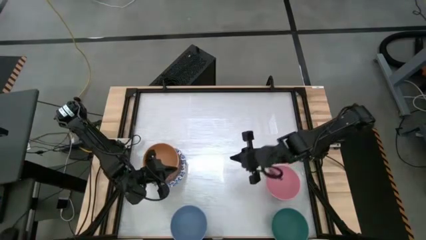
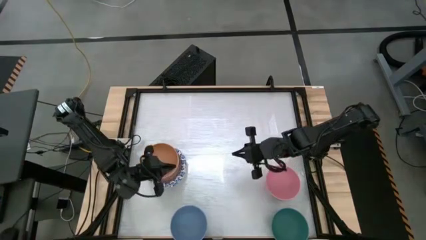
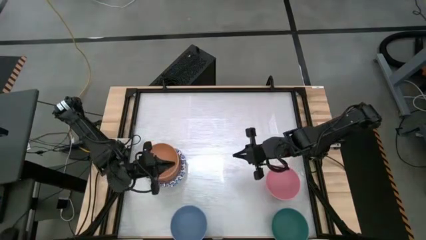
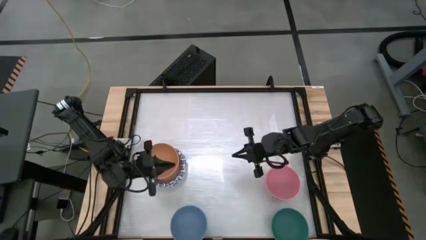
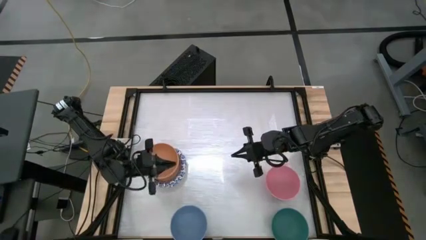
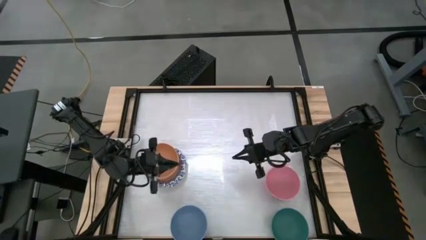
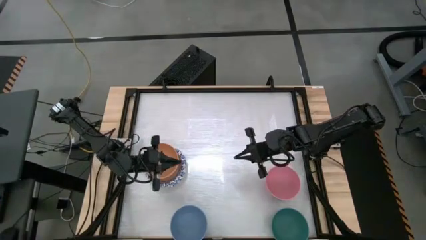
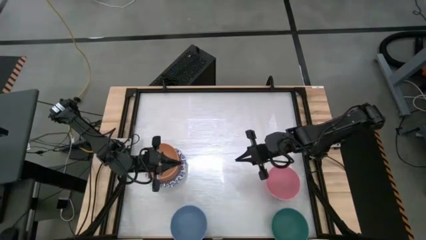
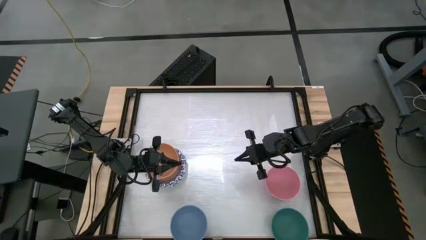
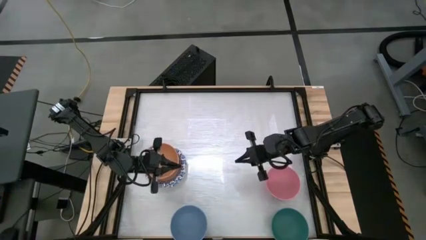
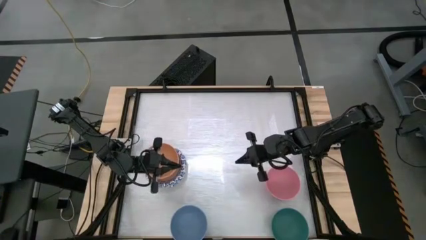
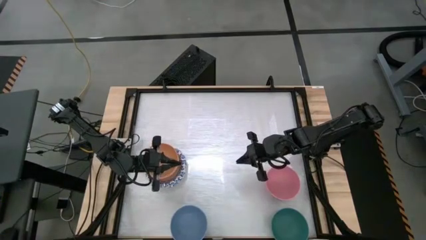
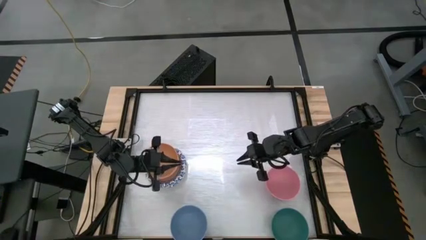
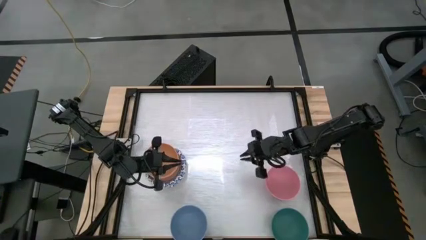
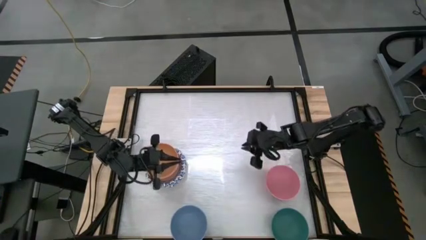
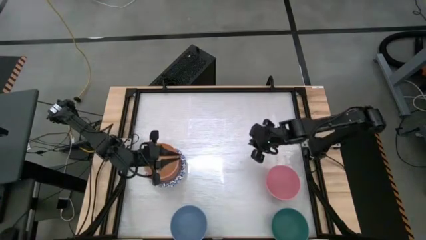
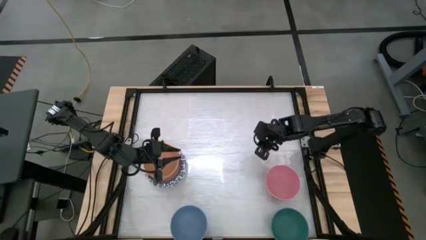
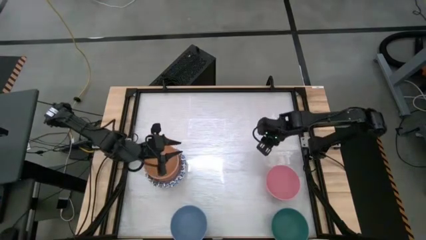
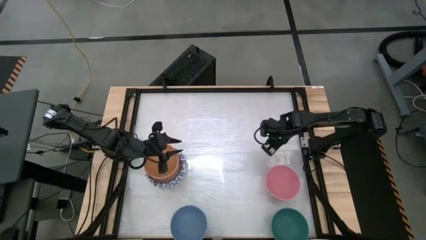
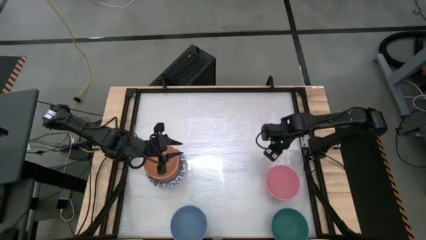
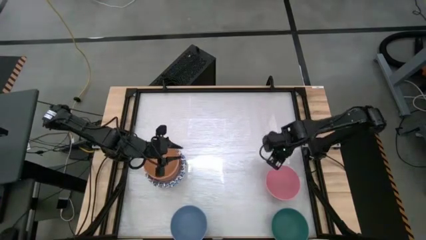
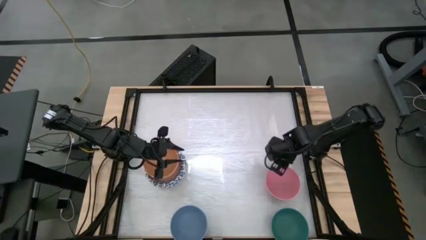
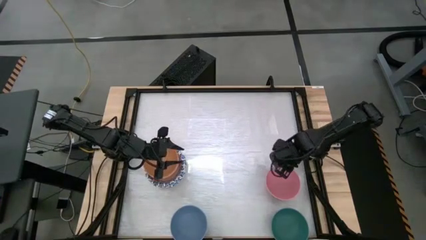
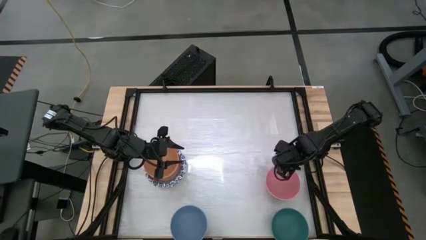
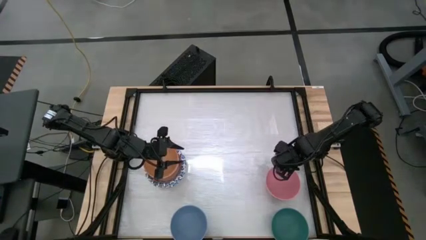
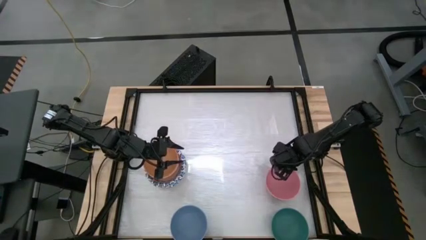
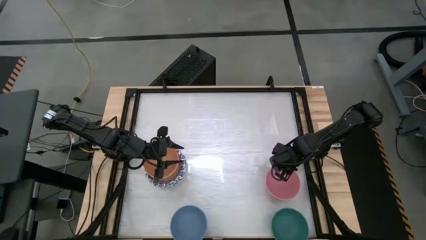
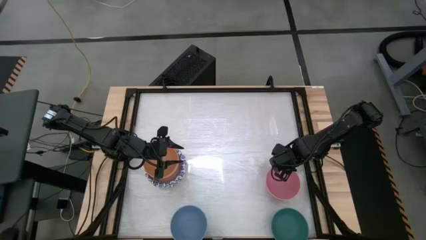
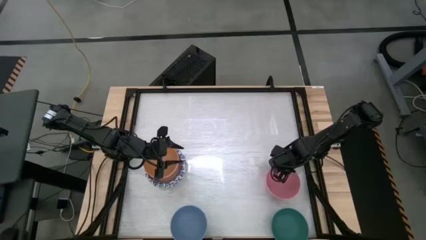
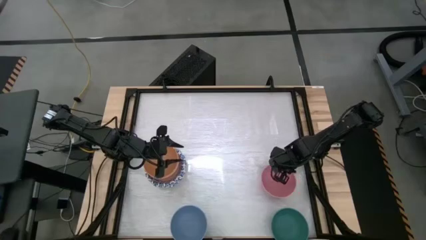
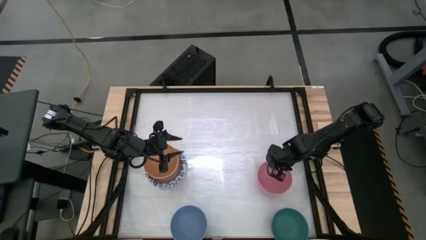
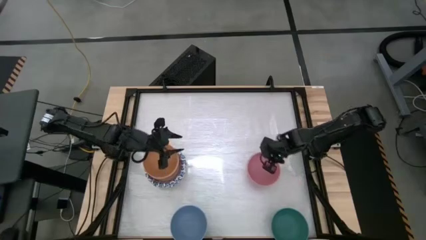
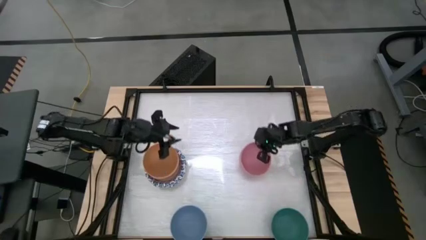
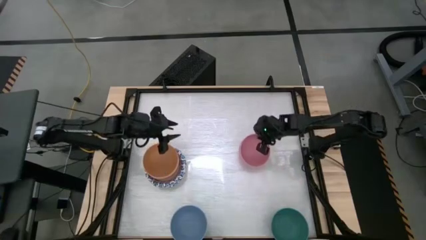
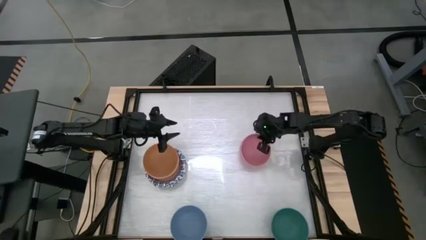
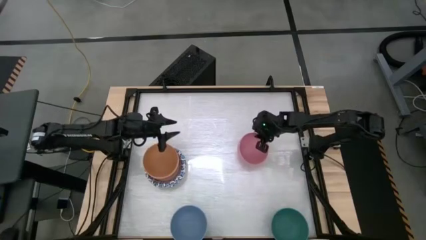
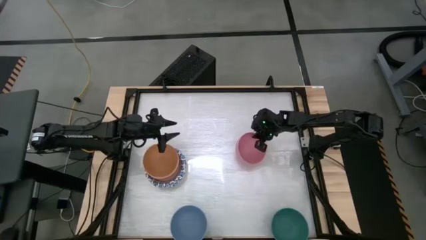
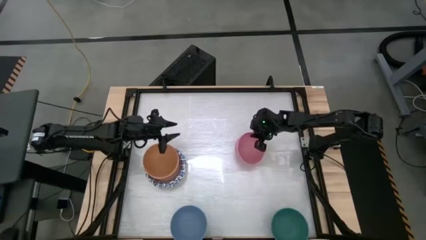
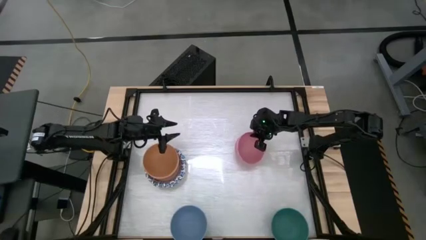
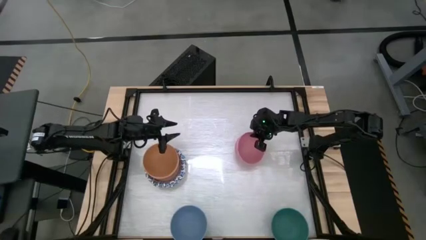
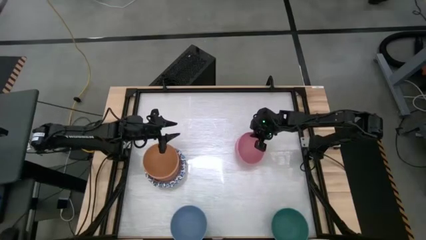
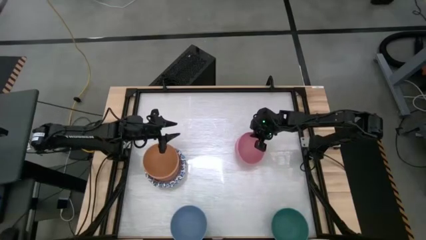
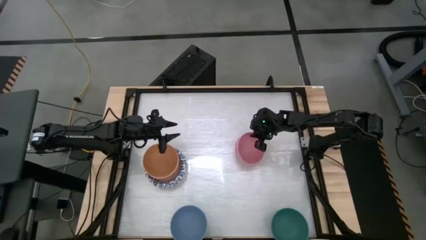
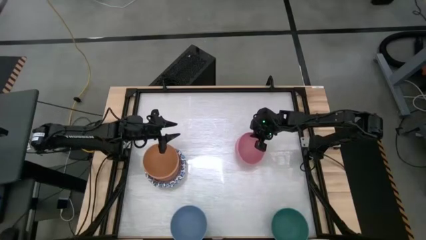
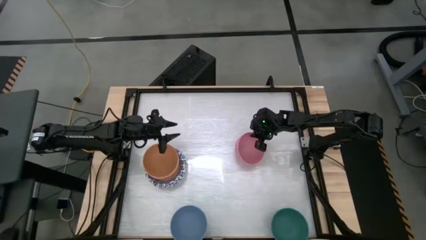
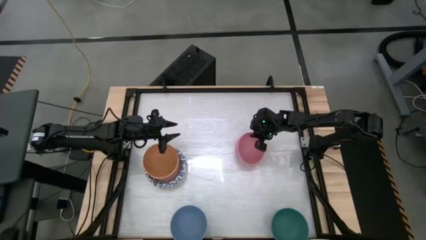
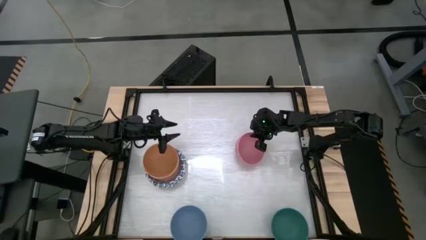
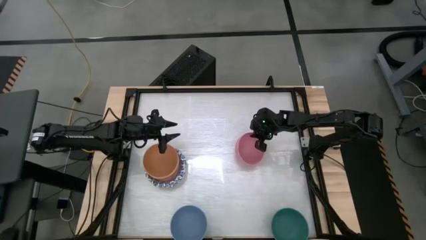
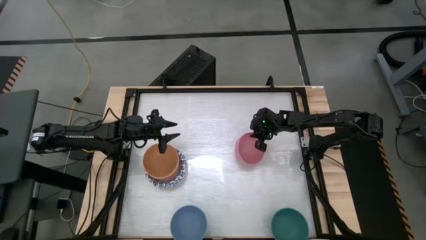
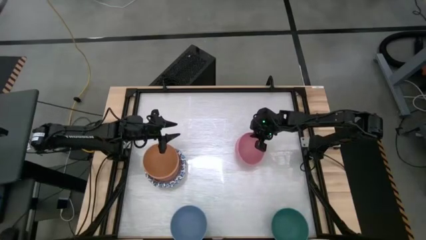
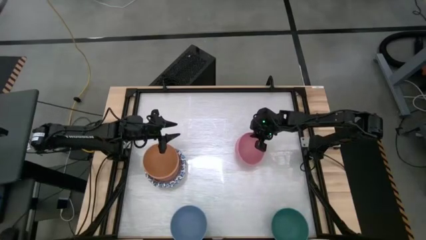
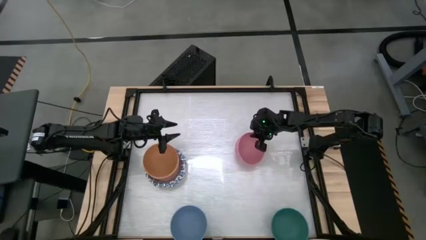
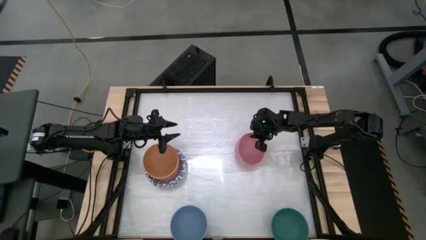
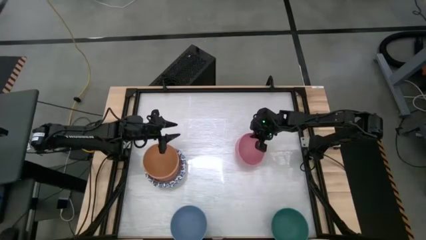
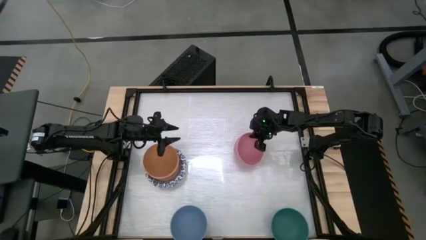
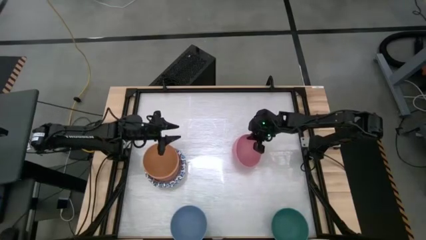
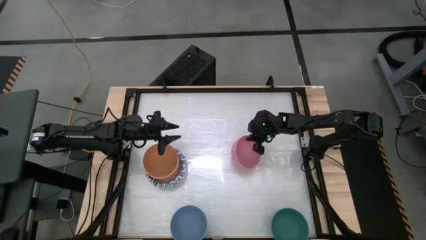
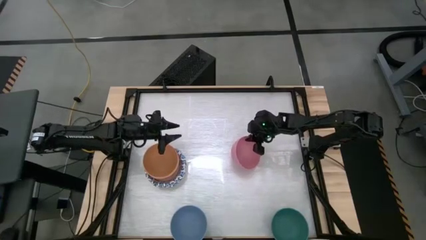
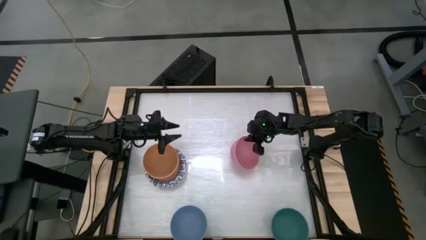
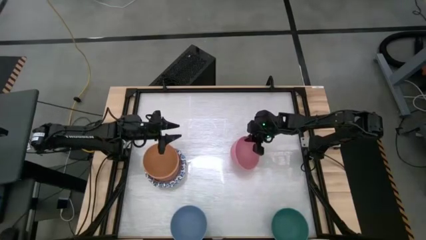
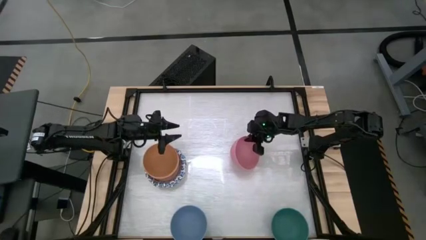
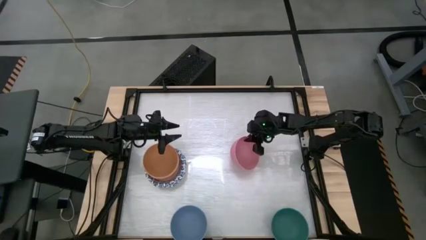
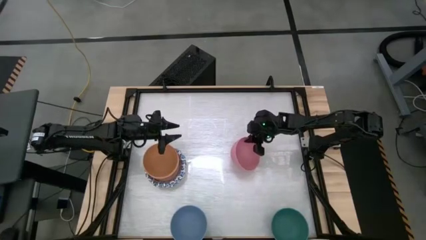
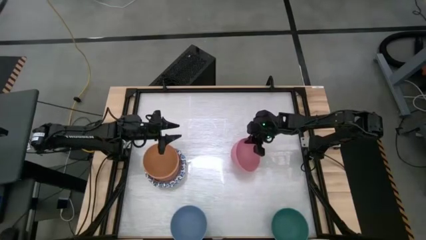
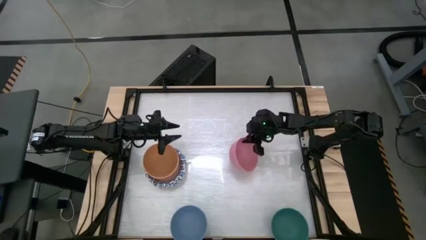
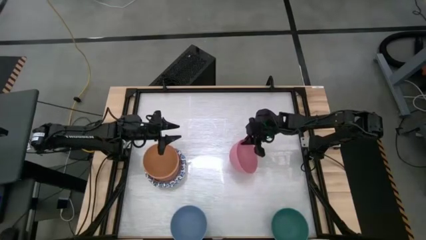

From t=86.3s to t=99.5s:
Stack the pink bowl into the light orange bowl
